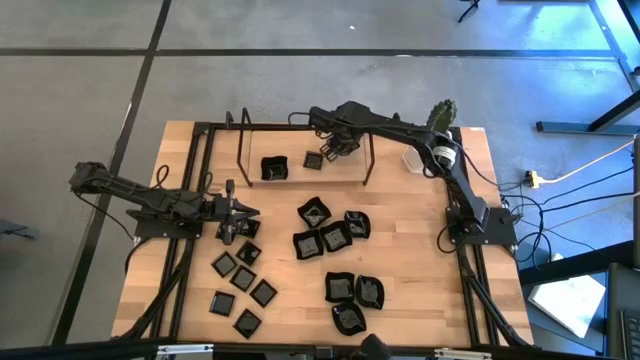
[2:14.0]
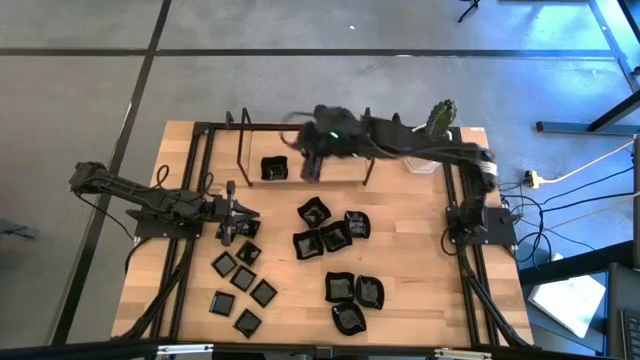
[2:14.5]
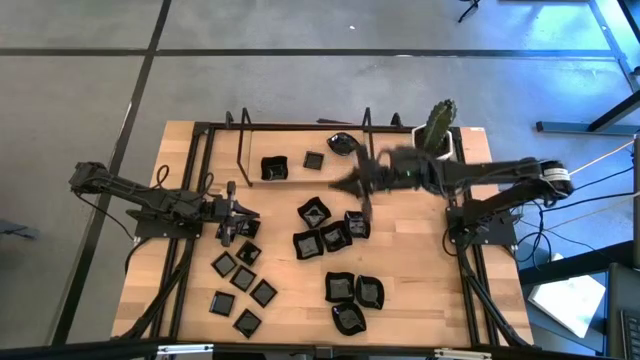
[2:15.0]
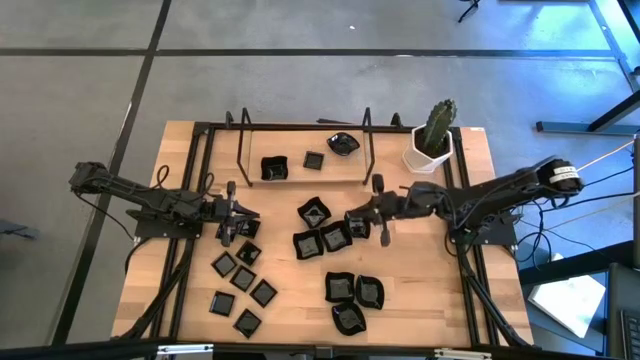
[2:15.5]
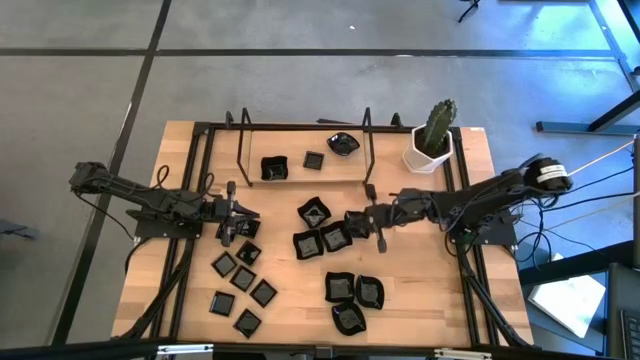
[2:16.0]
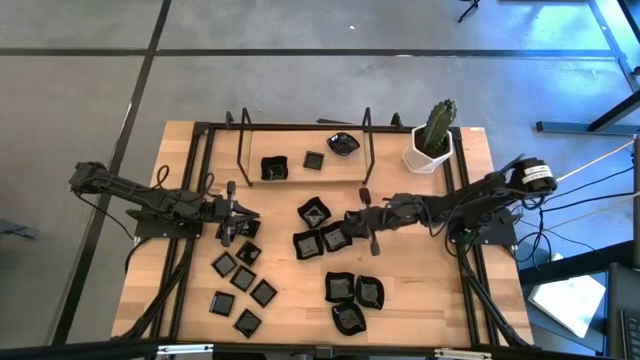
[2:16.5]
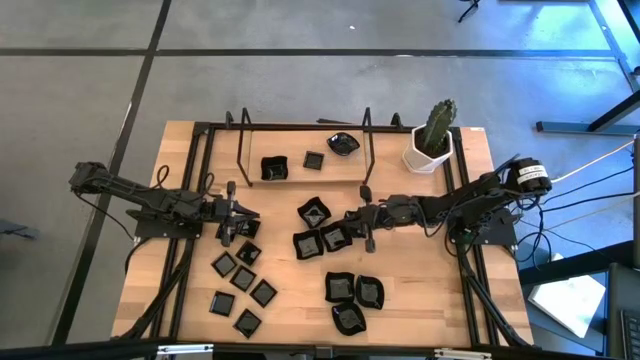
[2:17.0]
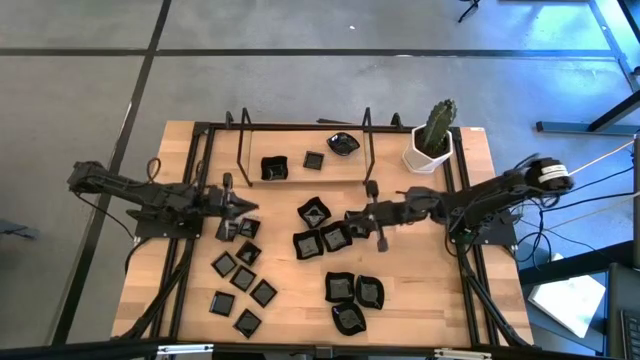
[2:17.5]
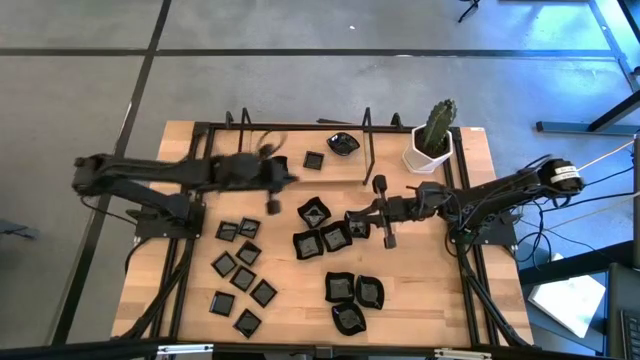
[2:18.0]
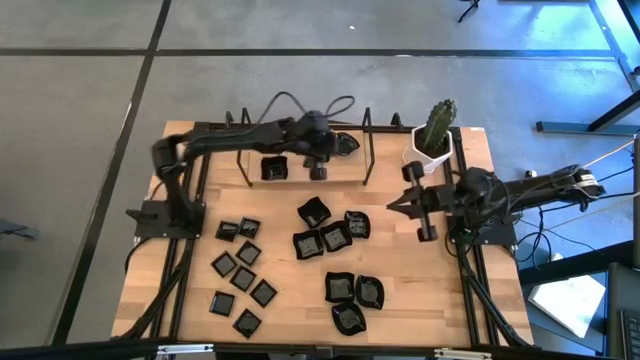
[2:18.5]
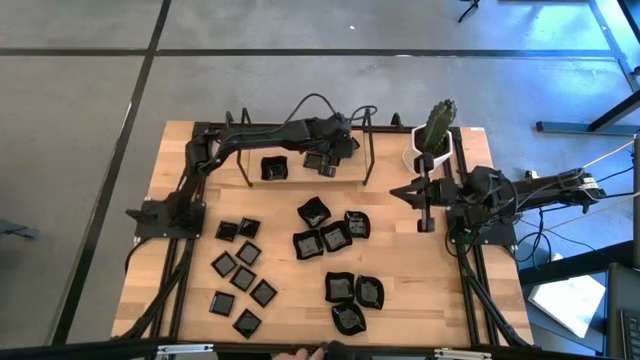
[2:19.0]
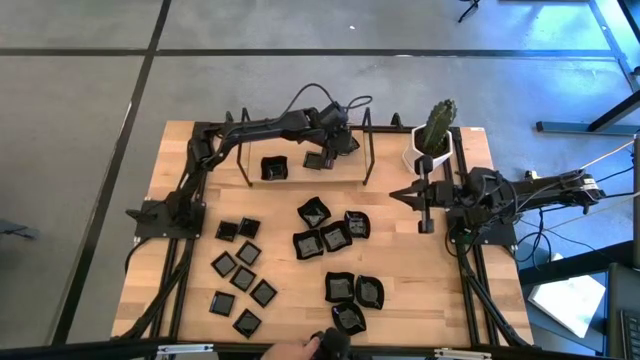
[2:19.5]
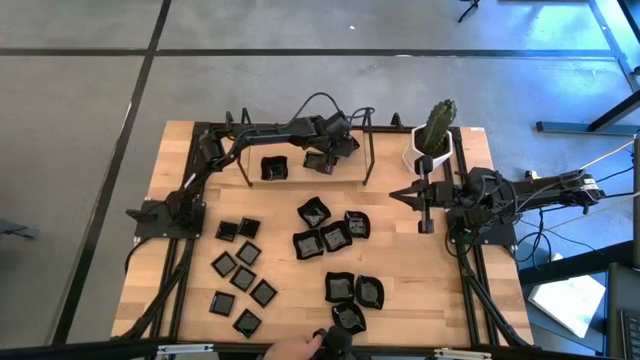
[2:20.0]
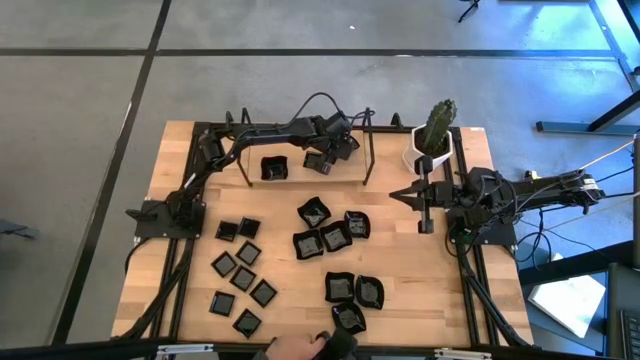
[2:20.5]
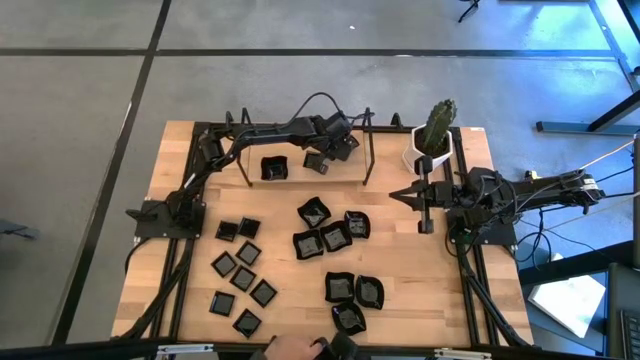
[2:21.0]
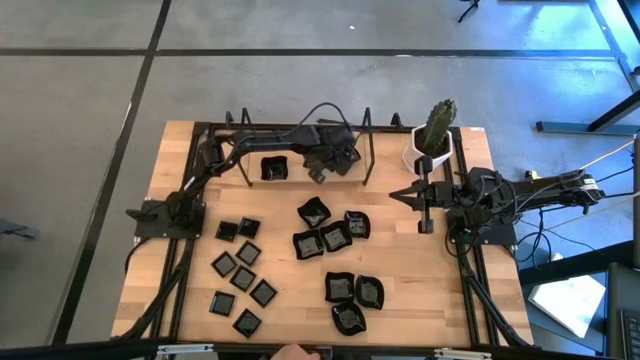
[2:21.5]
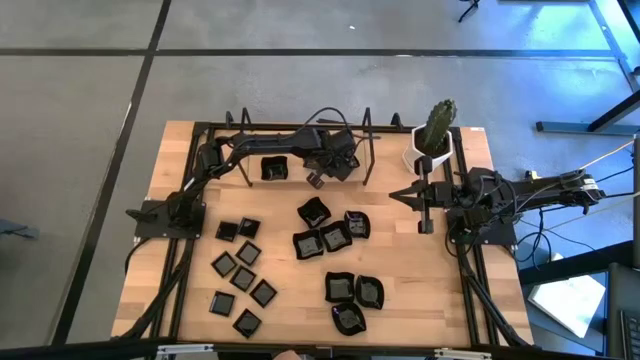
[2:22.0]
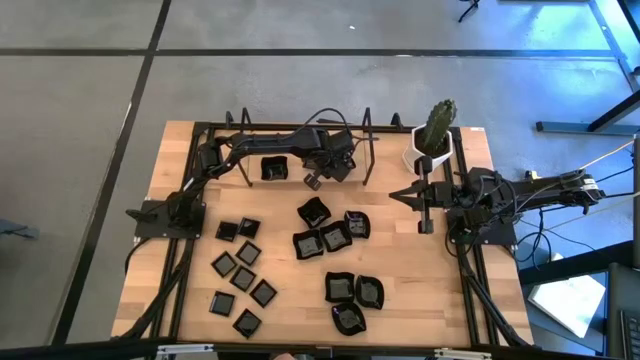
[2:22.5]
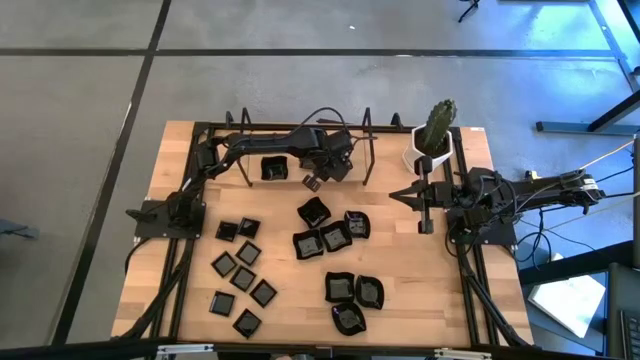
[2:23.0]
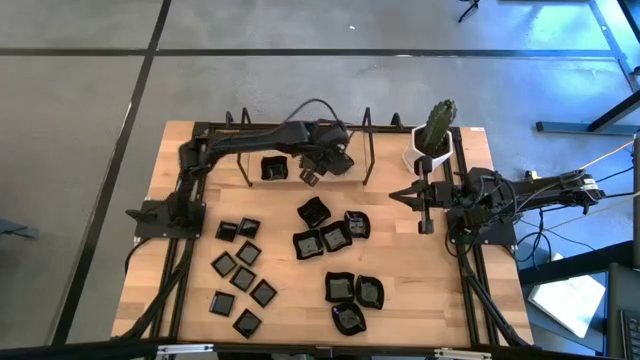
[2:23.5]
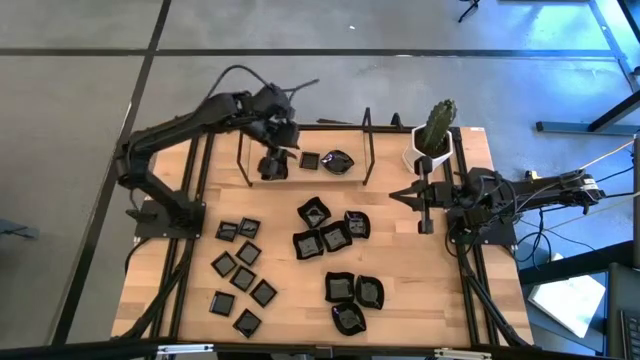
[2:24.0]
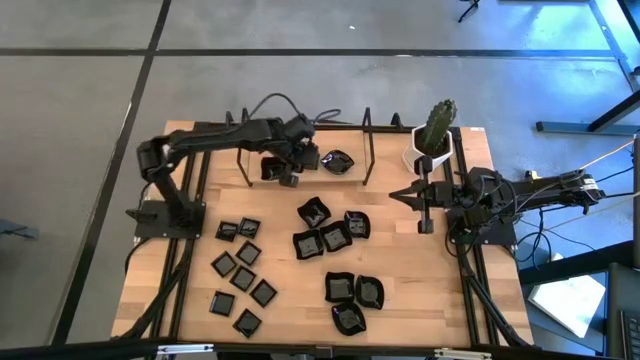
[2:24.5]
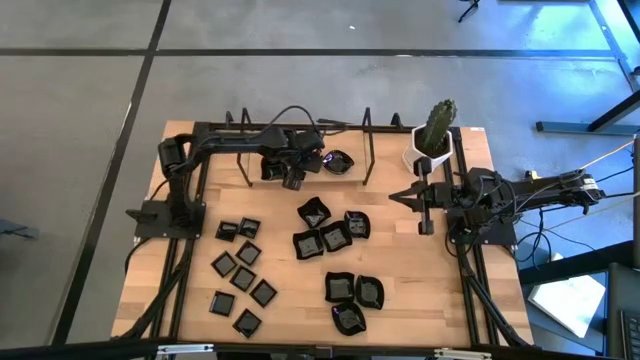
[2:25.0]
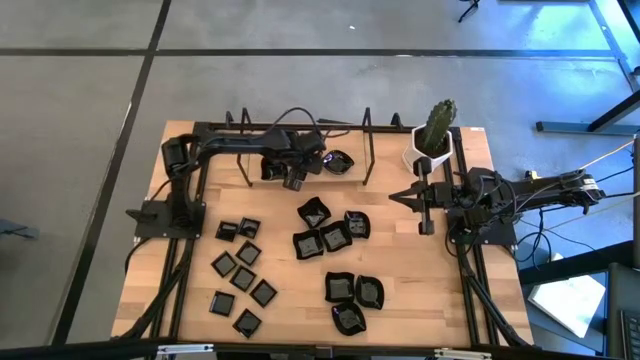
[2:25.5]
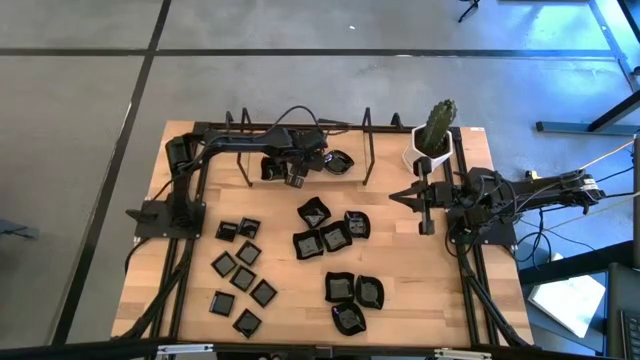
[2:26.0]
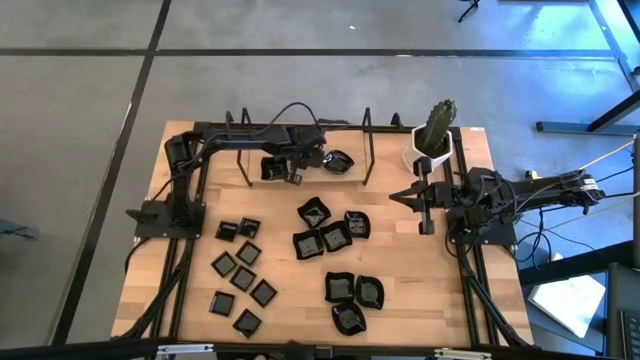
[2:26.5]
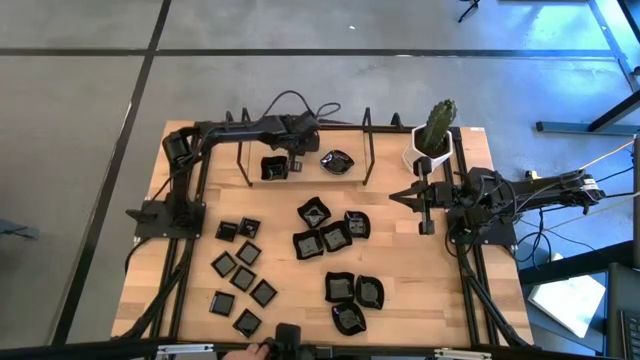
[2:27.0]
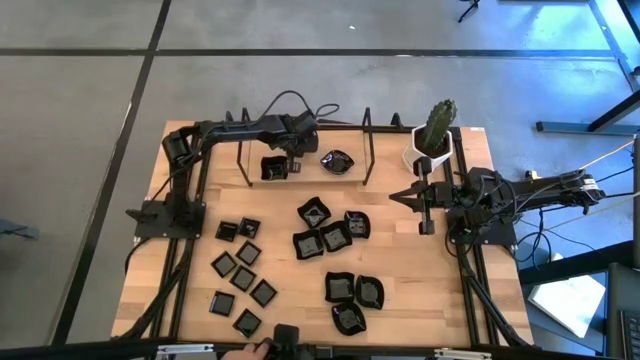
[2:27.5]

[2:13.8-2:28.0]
Task: Pick & Place Mini shaped plates
Stack the leaf-shaped plate on top of the leaf-shaped plate on the shelf

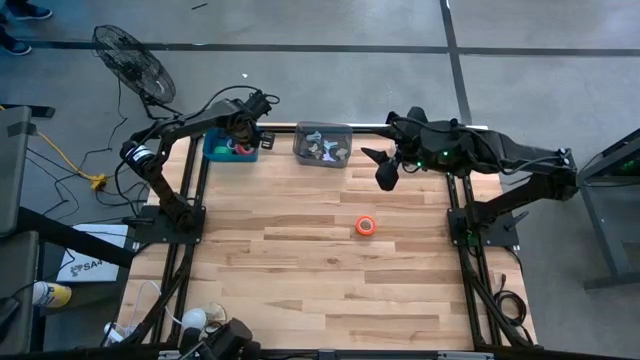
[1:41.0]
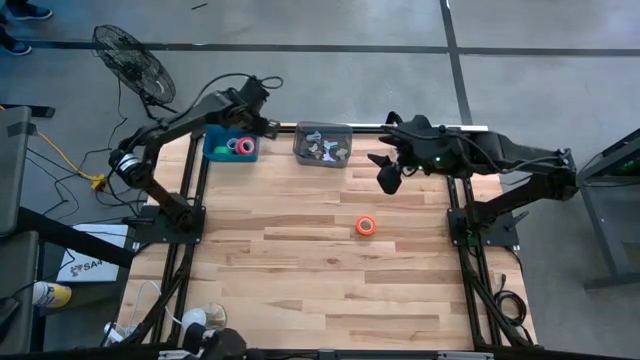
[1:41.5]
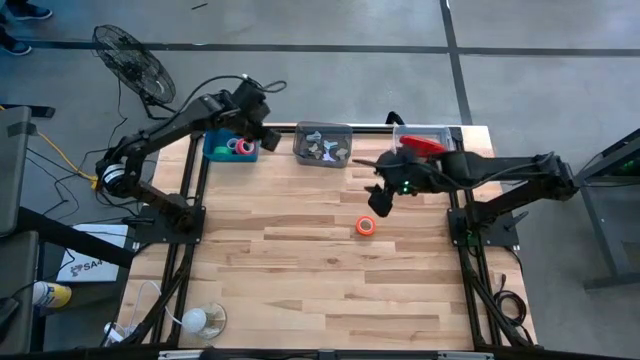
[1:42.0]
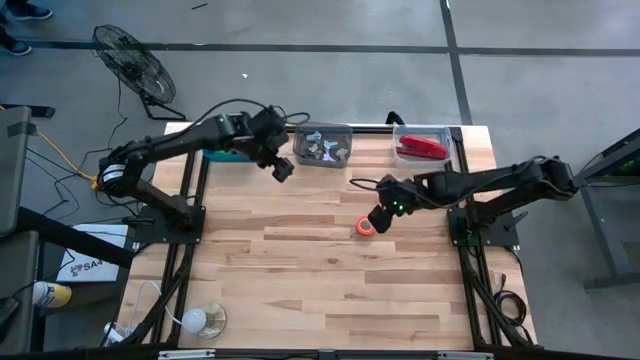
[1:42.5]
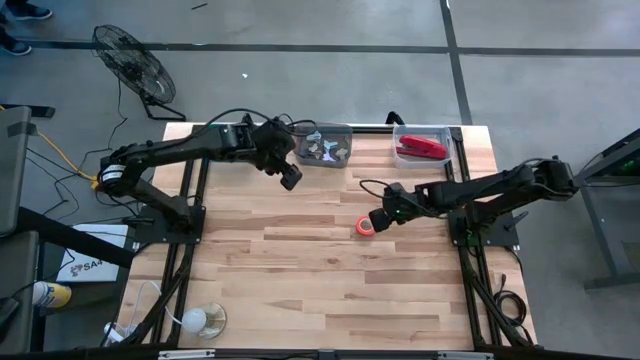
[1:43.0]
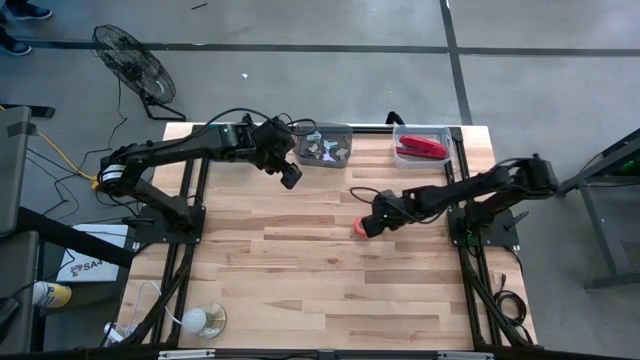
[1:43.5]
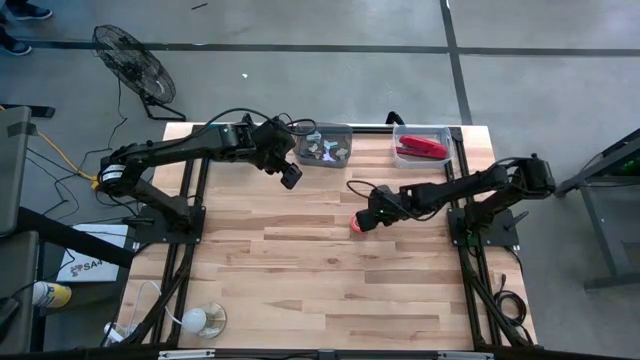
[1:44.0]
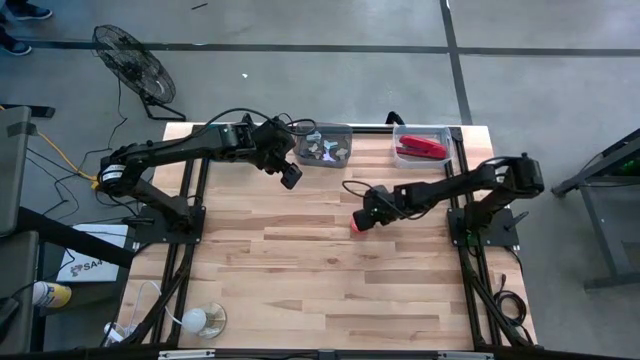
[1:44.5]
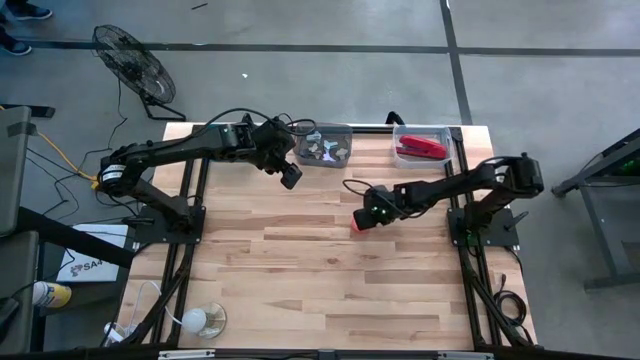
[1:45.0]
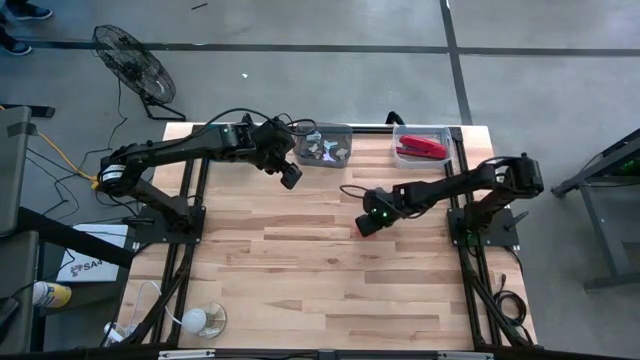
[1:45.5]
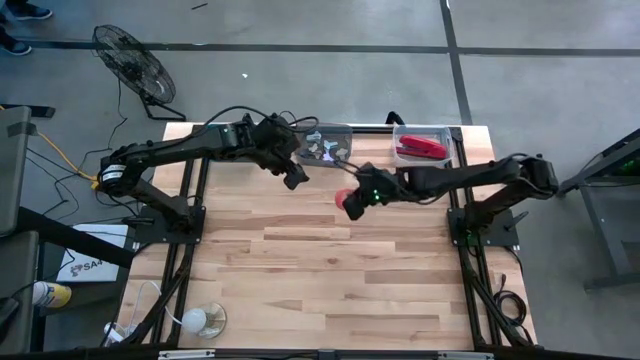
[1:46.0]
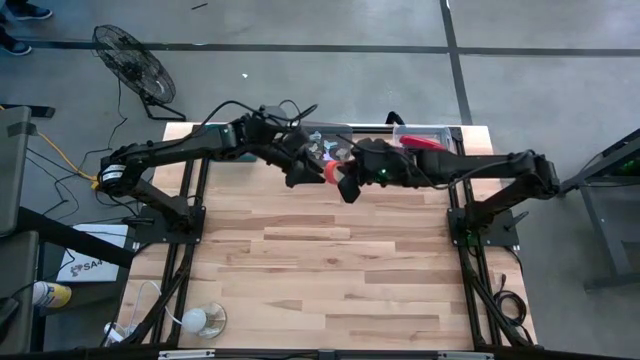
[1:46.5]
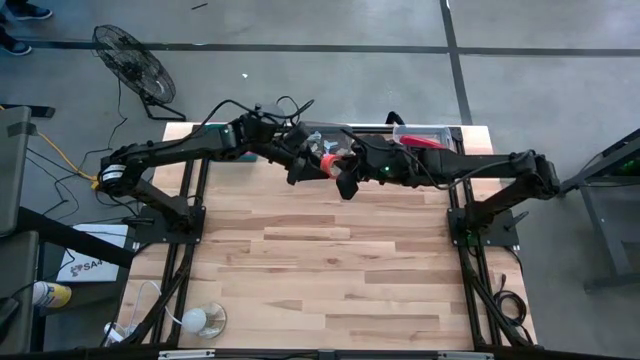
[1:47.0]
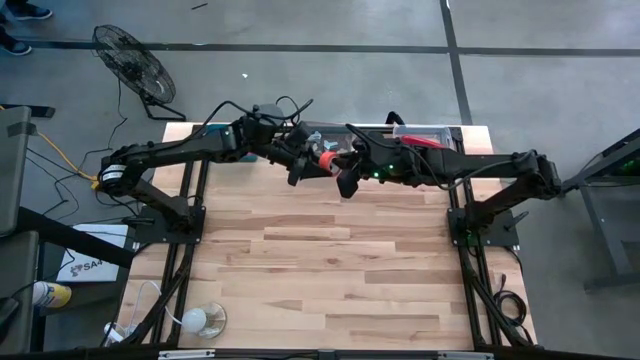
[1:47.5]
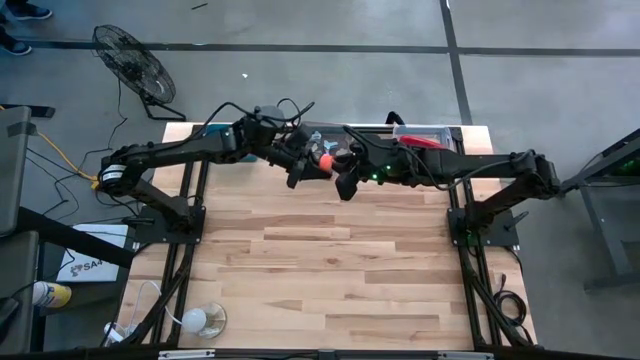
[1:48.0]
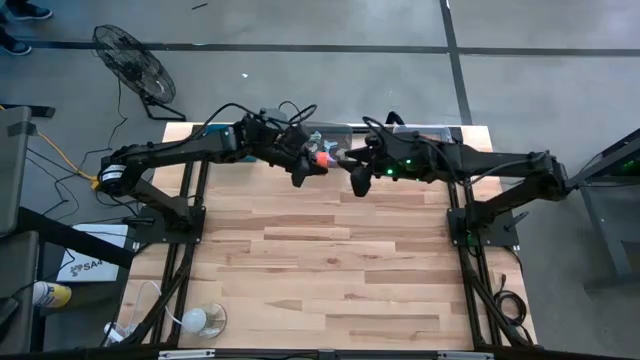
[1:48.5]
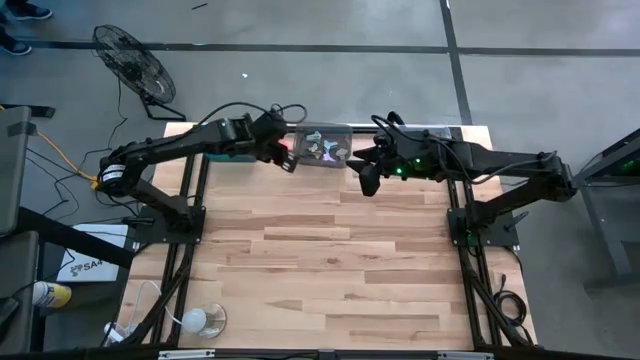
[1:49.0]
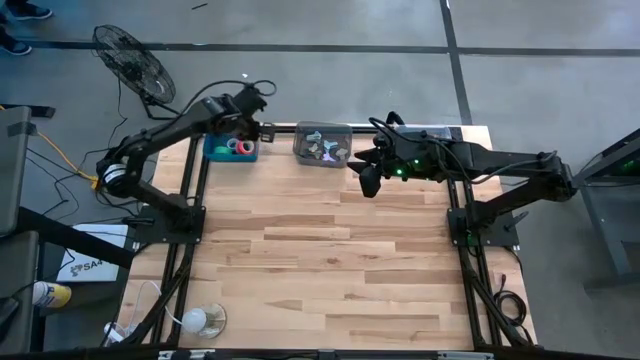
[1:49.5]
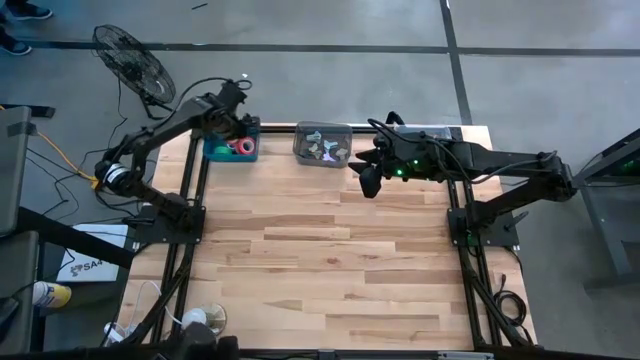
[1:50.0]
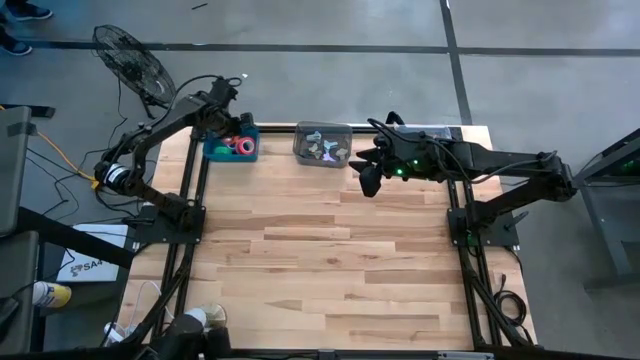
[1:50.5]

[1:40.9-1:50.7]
Task: Pick and place Stapler, Stapler remover, tape
Put the orange tape into the blue bin
